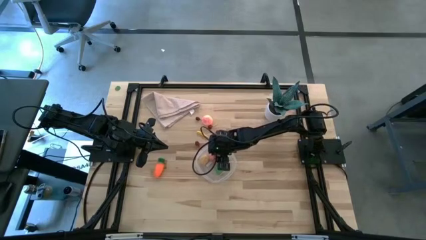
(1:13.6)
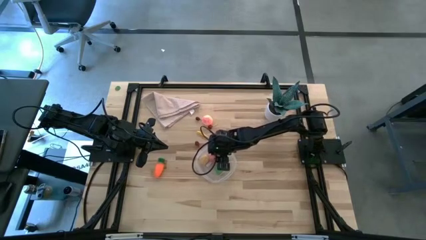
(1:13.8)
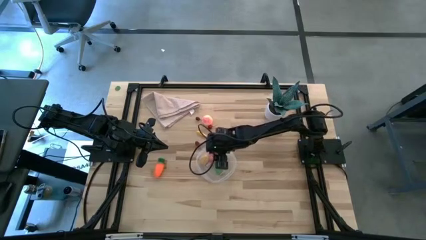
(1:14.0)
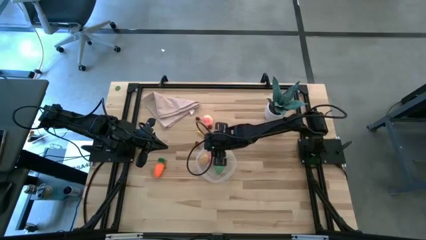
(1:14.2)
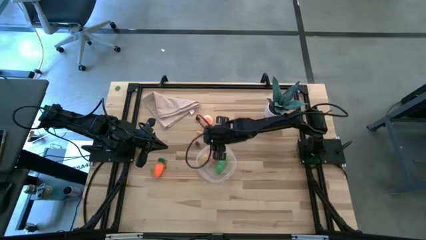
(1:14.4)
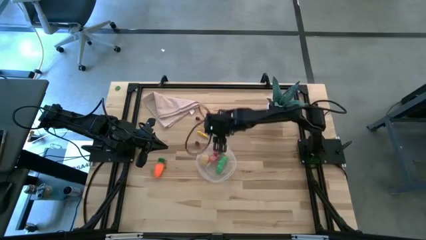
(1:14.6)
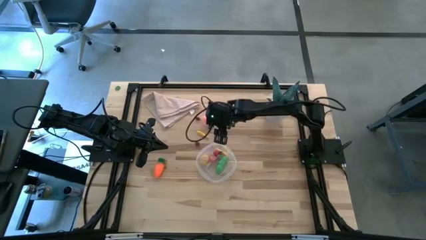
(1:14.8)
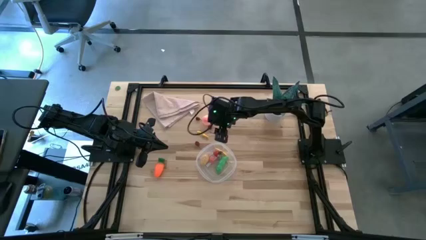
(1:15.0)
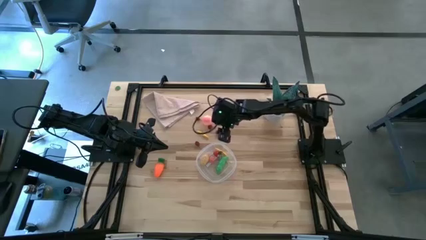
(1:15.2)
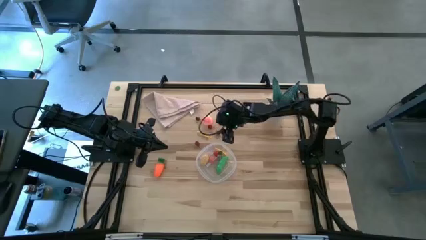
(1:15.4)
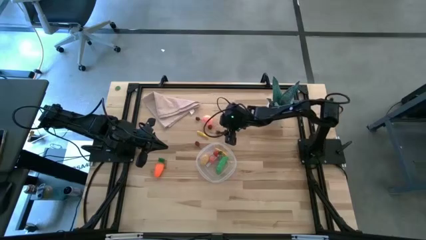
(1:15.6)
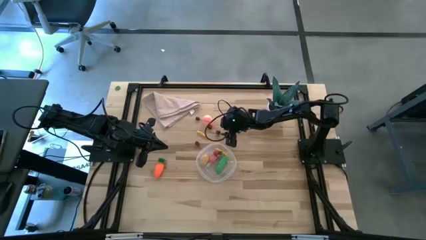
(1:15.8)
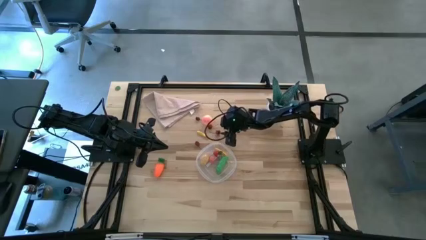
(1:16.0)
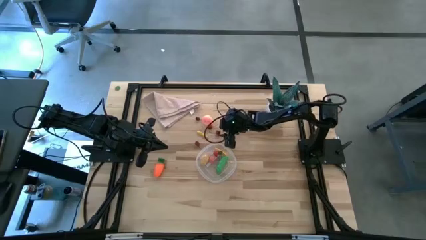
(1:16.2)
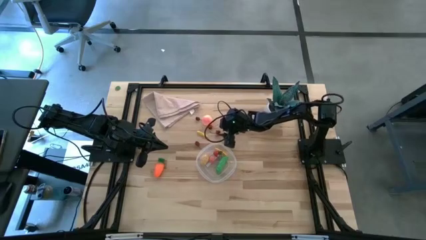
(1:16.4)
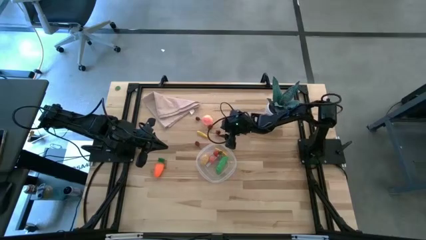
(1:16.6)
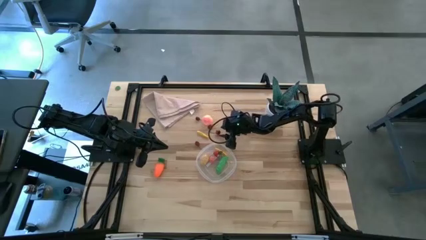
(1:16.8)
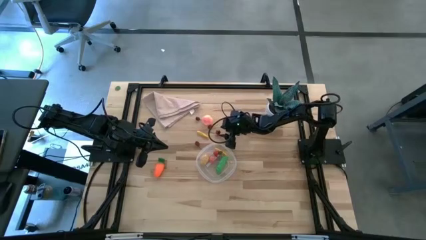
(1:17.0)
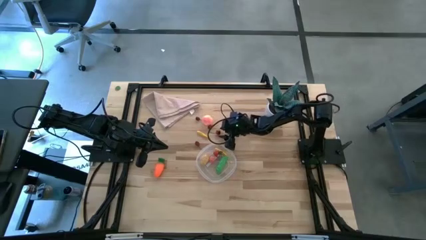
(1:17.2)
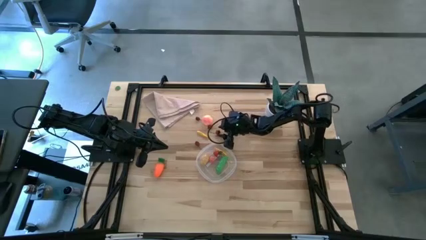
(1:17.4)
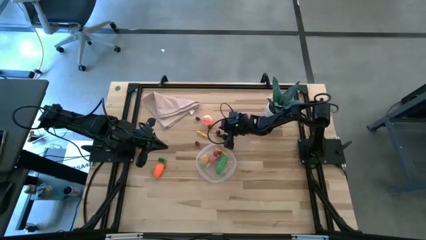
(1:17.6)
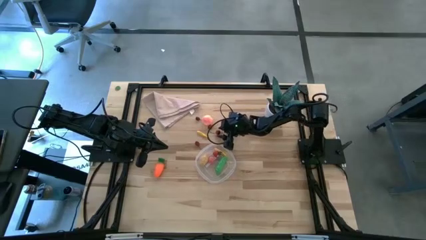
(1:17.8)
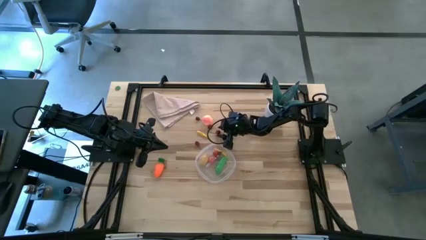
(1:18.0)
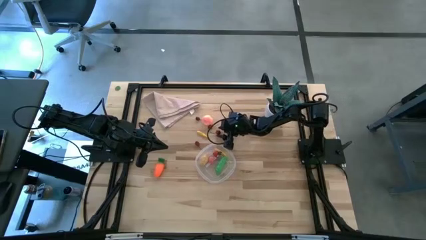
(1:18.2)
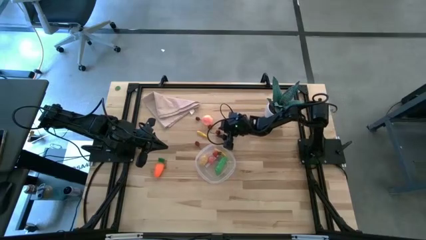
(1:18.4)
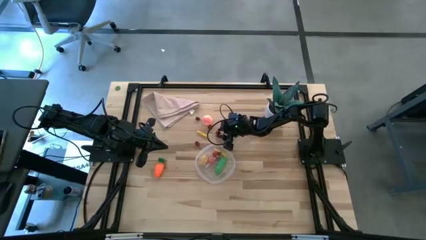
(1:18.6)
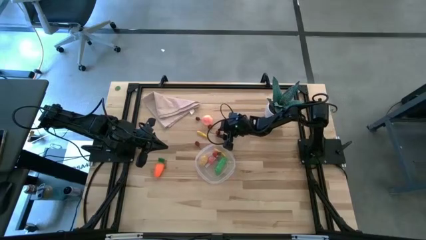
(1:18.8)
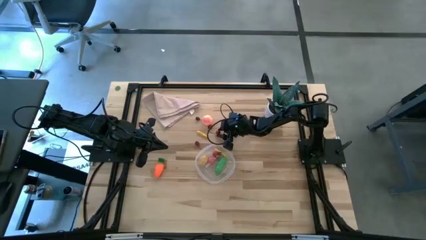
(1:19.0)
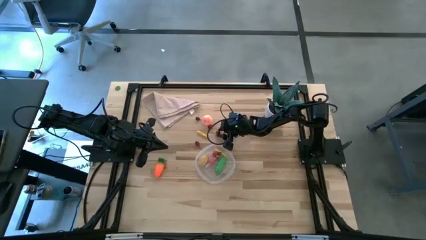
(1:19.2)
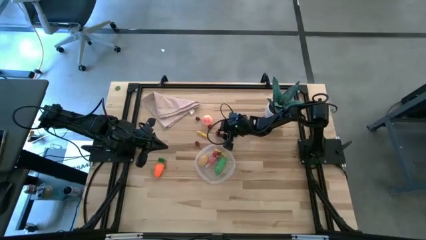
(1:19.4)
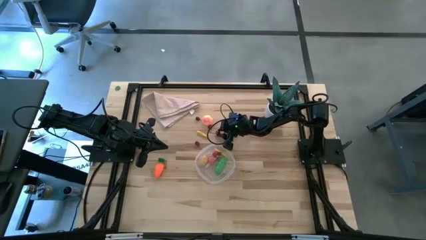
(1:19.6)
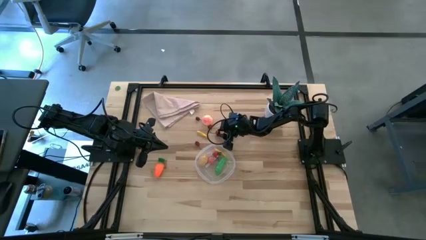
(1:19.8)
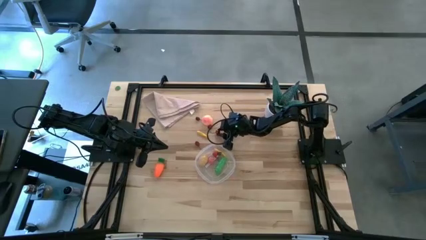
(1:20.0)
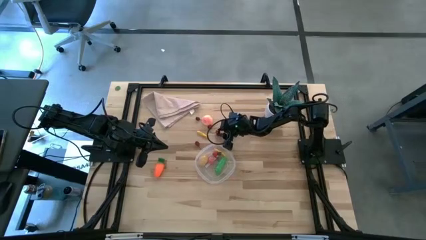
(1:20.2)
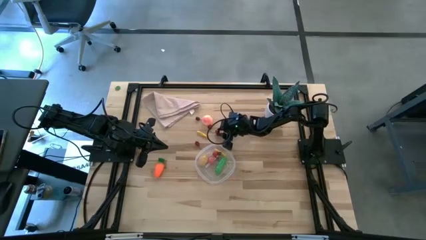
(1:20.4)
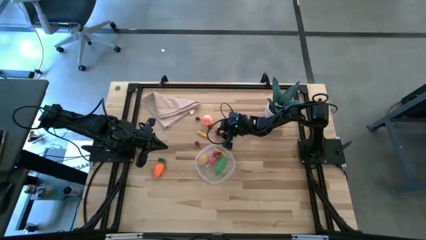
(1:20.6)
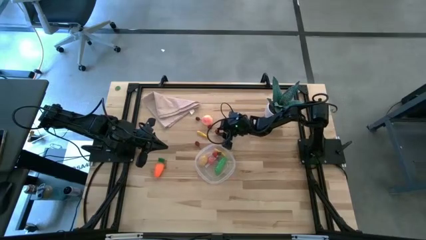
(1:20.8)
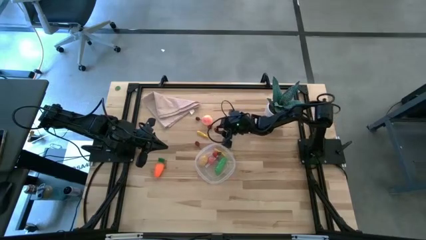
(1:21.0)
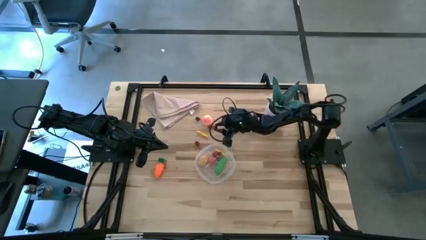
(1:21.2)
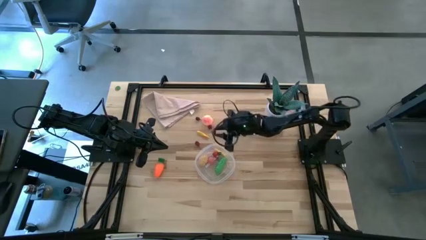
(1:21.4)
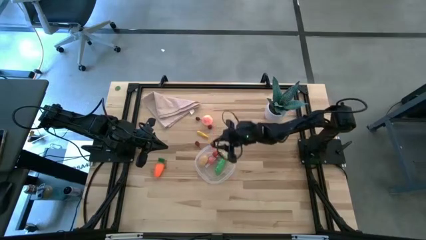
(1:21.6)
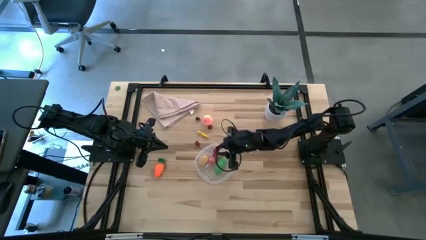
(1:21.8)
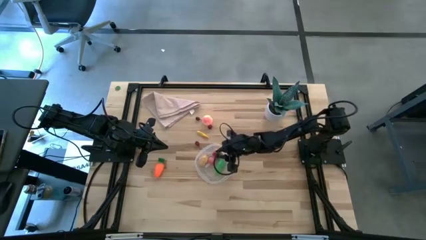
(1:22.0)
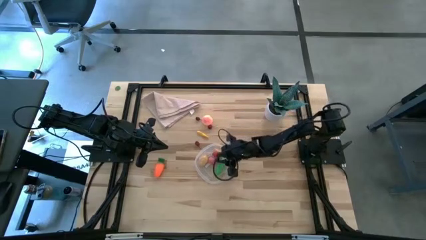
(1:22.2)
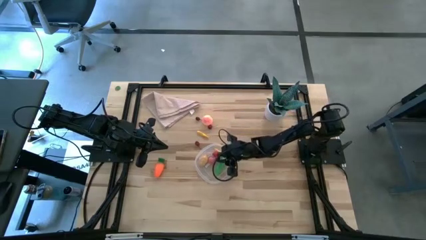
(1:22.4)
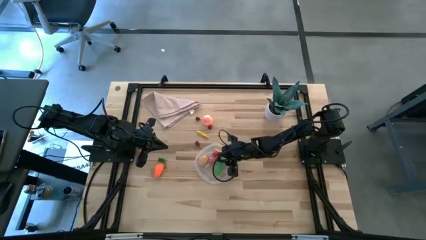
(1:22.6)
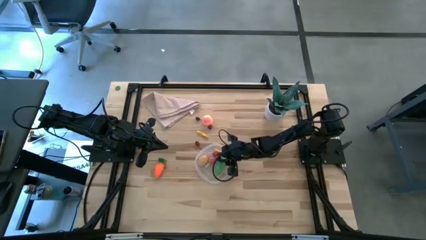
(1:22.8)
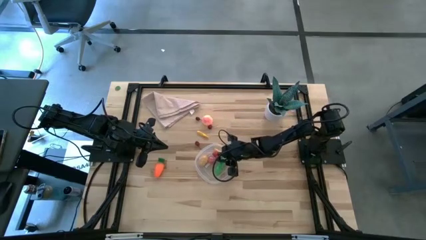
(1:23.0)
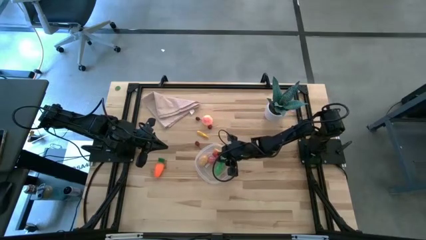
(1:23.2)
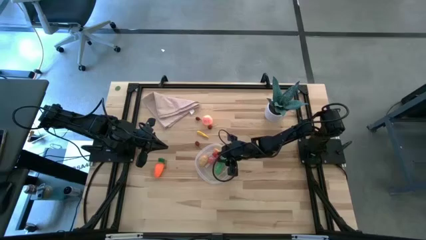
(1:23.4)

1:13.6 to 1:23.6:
Task: Pick and placing Produce into tupperware
Put the red cherry into the transparent bin

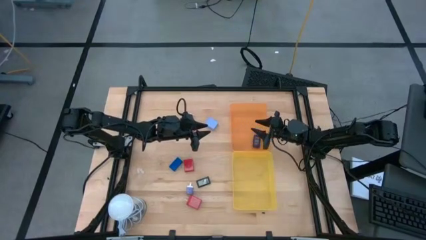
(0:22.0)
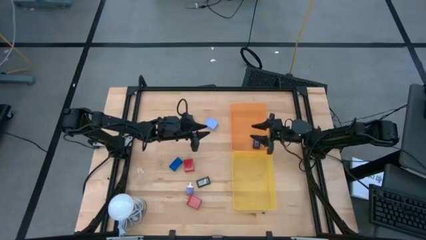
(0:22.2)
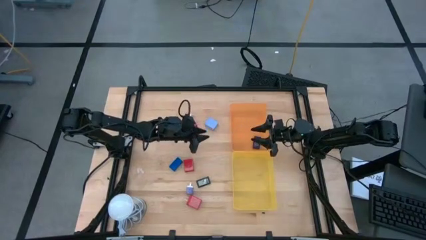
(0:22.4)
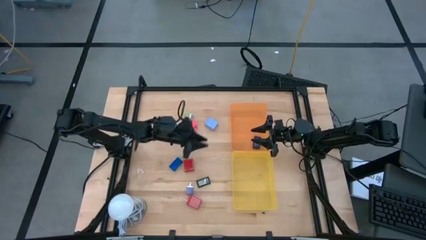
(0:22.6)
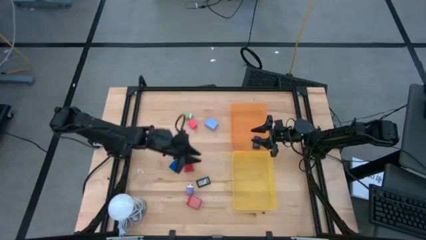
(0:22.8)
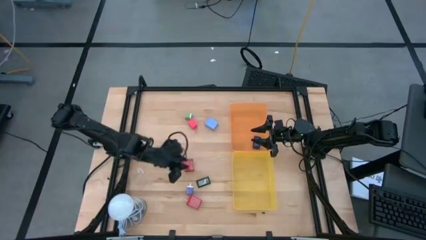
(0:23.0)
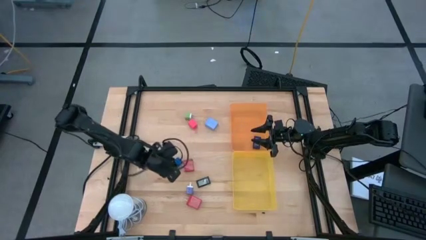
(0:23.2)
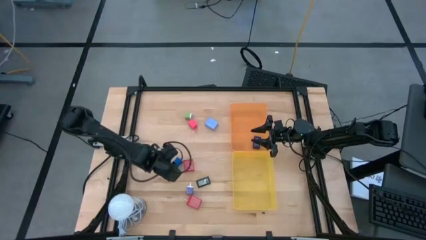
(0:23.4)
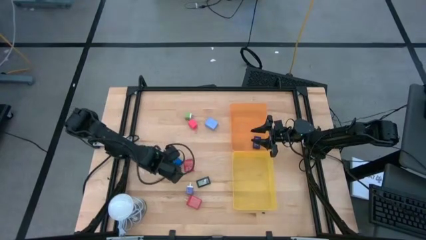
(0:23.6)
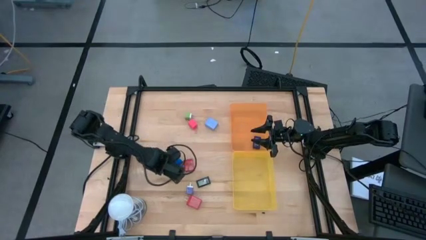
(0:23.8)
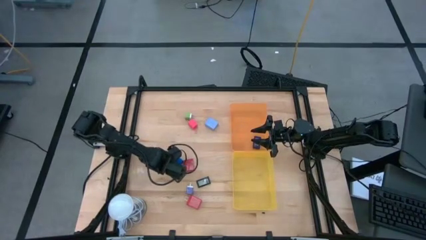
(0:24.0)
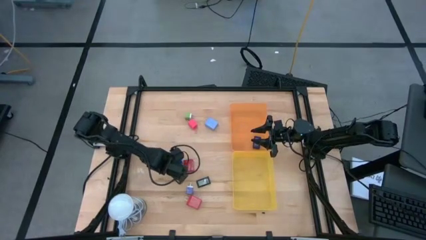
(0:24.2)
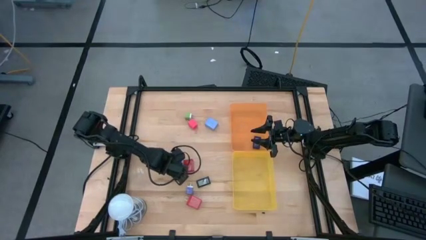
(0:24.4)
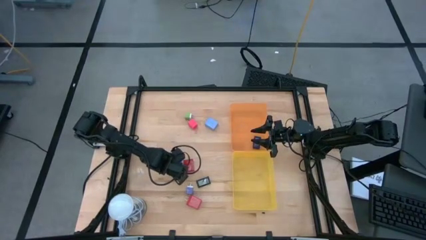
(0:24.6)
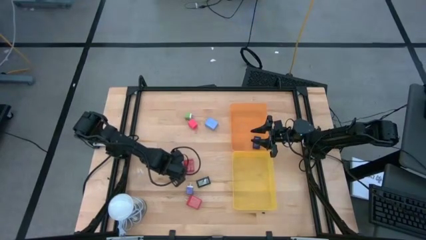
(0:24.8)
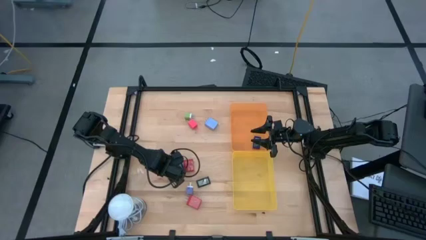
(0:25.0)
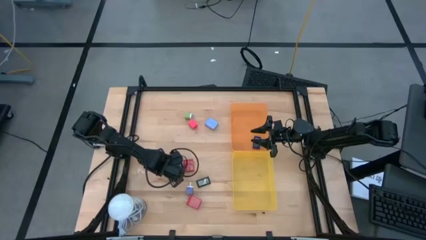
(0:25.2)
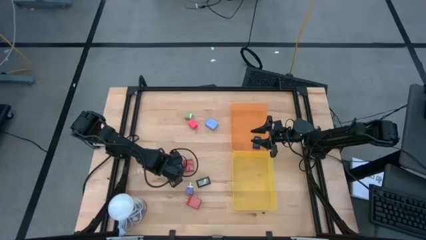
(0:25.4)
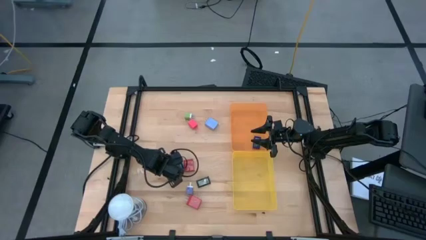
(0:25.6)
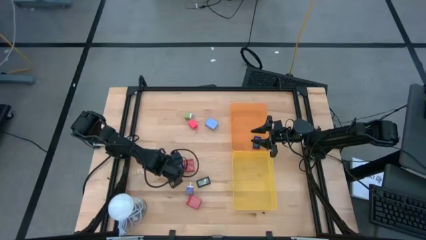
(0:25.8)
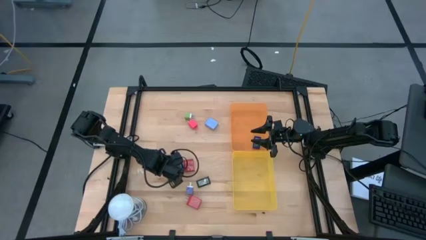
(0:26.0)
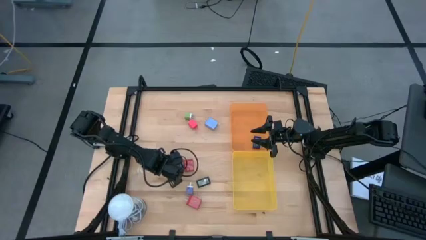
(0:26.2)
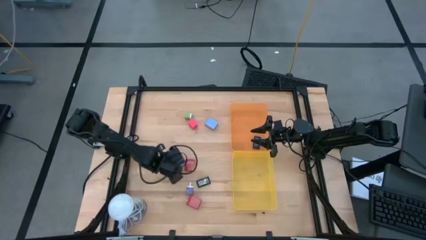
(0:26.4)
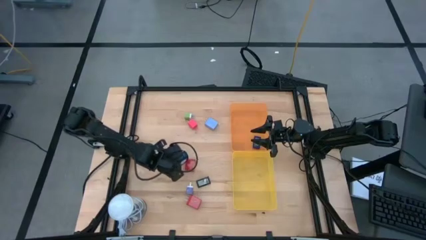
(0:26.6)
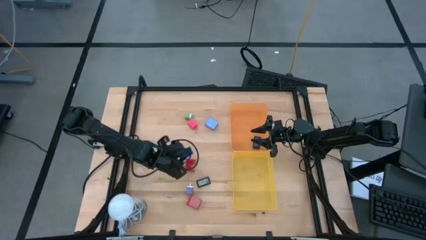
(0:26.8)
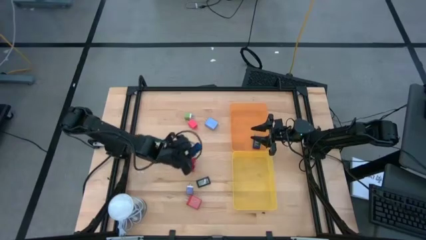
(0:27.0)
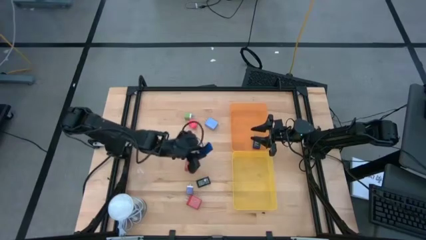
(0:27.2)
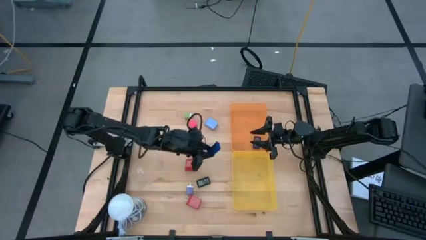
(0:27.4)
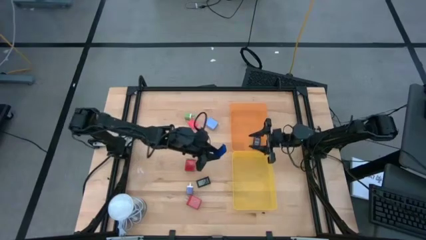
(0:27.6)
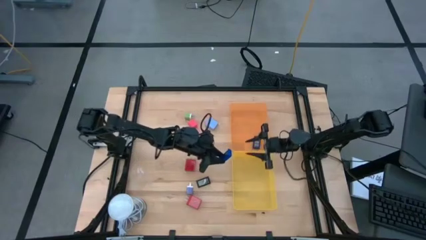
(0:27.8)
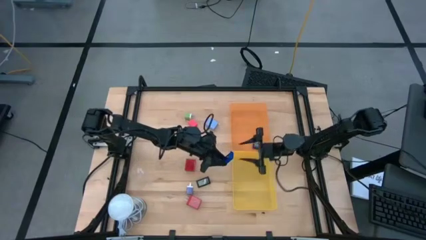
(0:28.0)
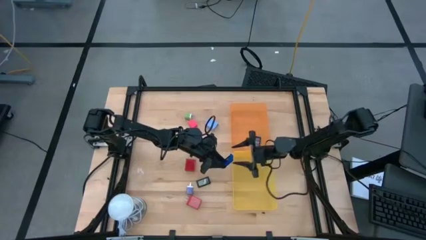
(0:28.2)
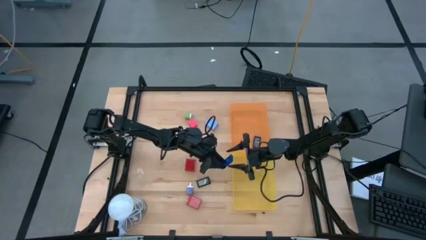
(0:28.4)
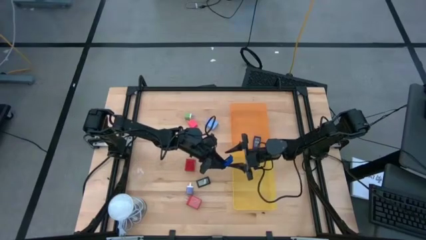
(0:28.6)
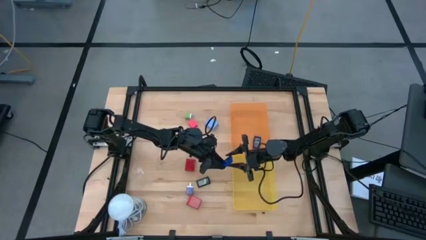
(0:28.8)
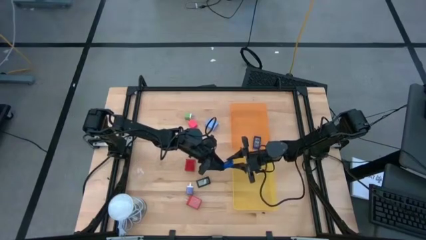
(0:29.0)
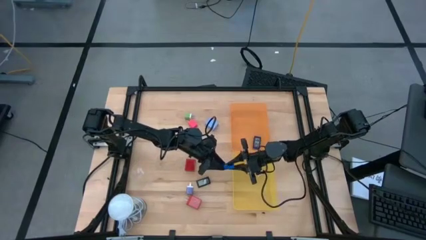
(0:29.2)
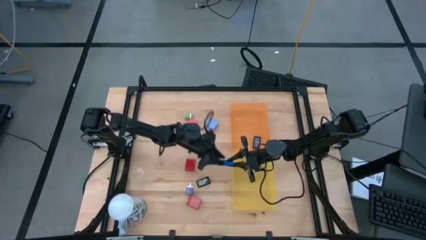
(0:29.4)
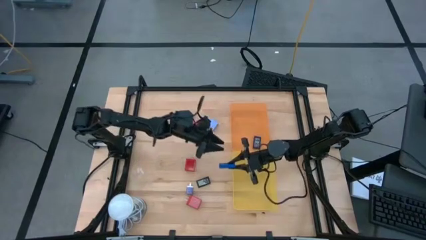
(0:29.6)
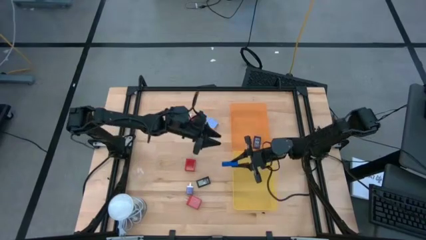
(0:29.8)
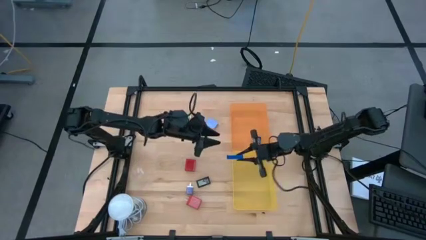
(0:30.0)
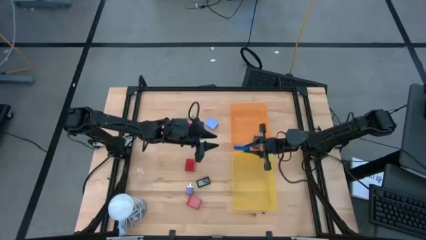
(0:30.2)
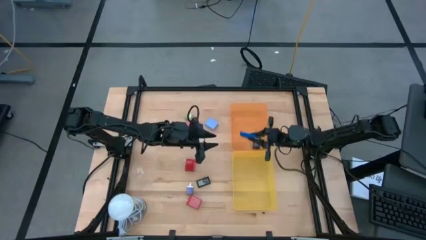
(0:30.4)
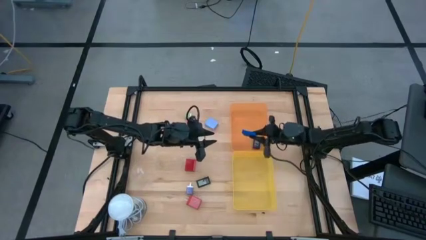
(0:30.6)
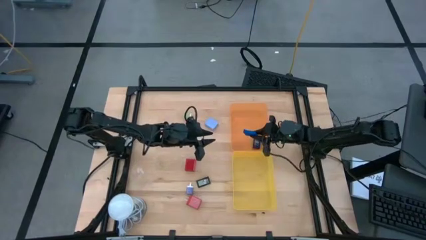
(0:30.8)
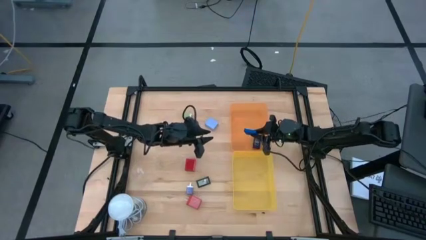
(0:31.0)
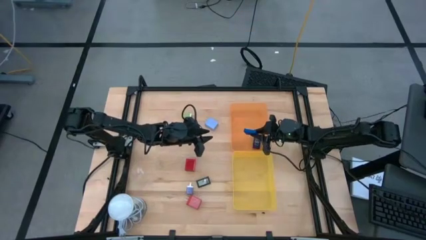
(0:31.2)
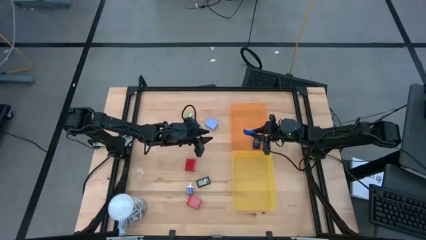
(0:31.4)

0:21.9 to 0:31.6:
Task: Pick & Place Office items
Put the blue timer into the orange bin
